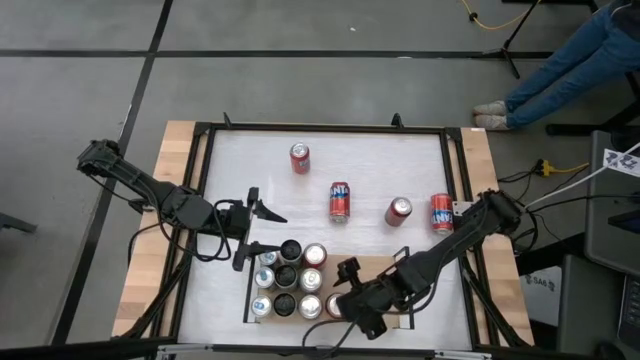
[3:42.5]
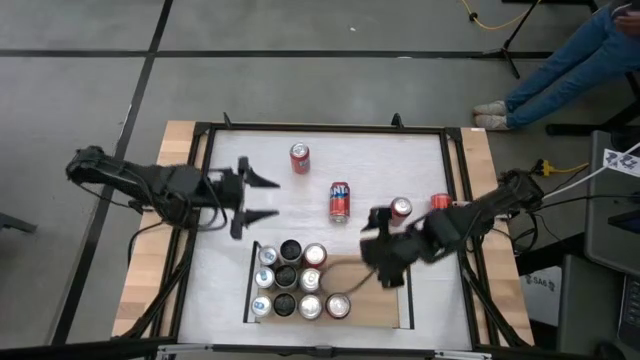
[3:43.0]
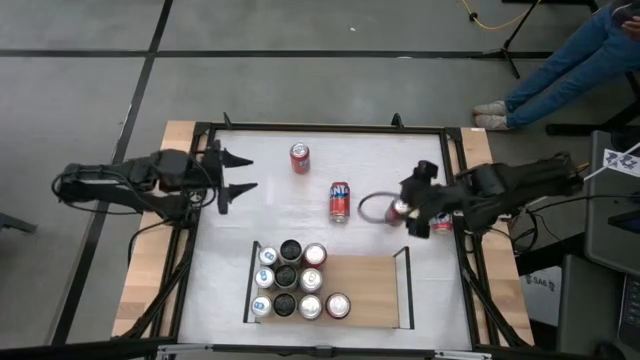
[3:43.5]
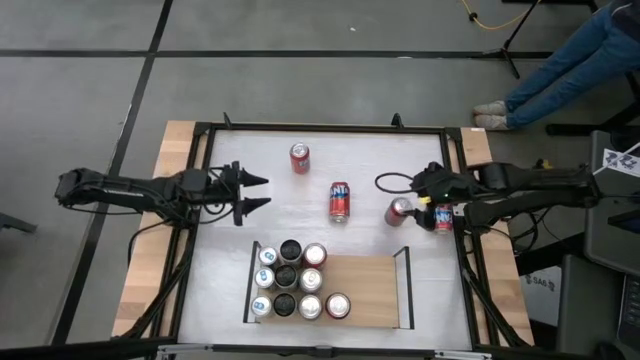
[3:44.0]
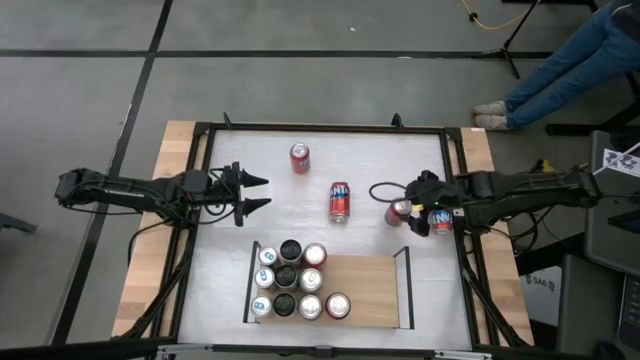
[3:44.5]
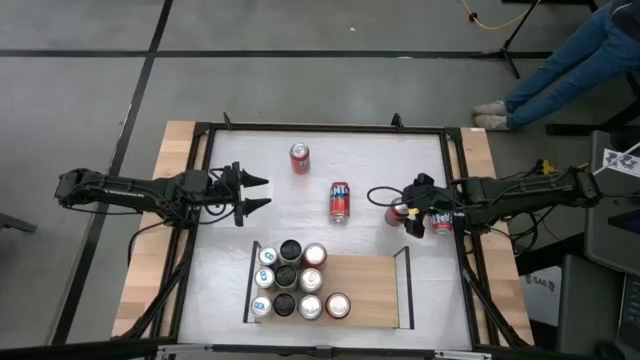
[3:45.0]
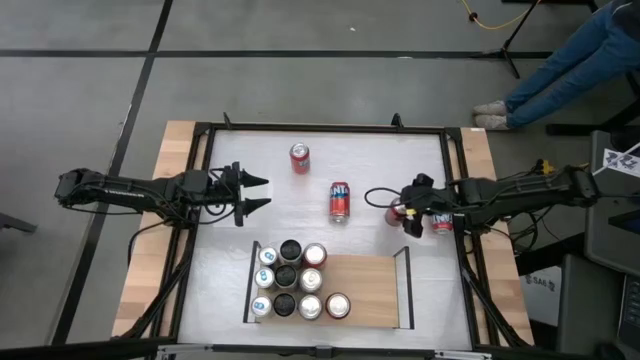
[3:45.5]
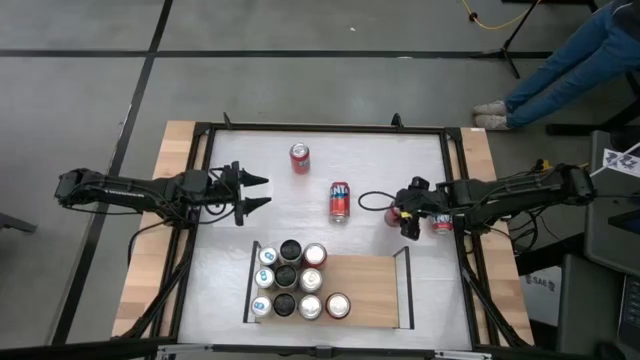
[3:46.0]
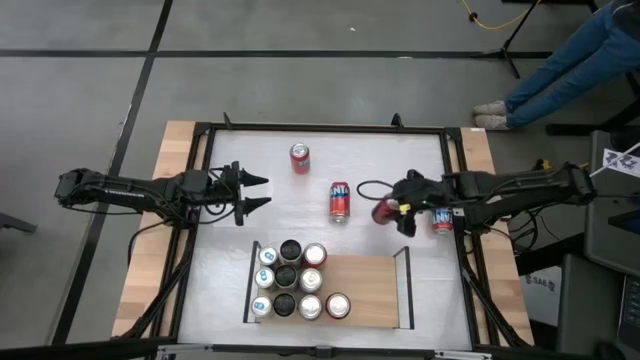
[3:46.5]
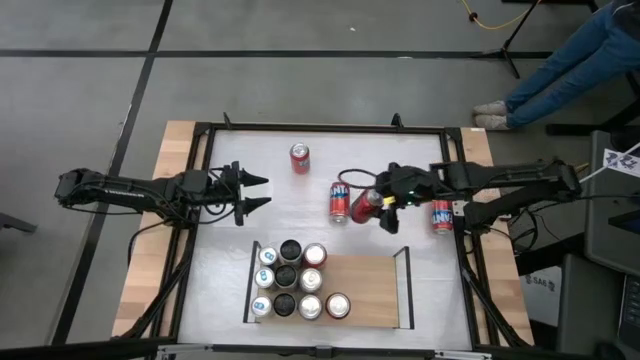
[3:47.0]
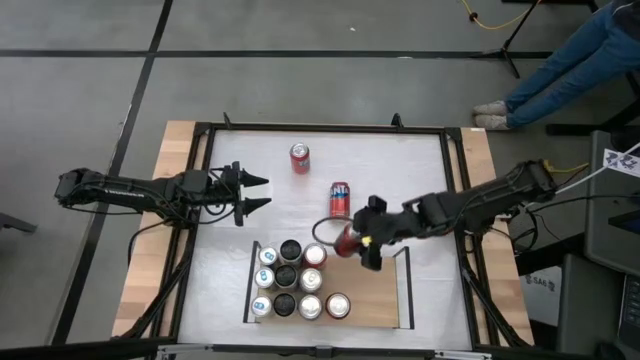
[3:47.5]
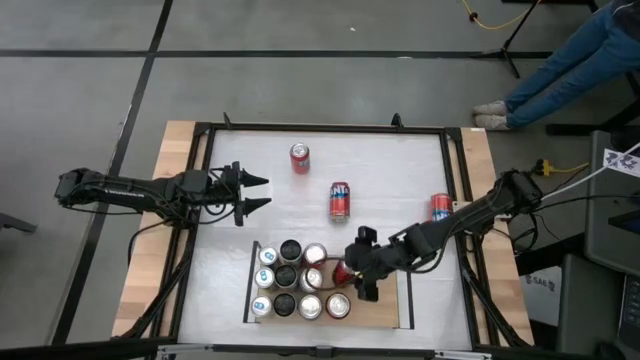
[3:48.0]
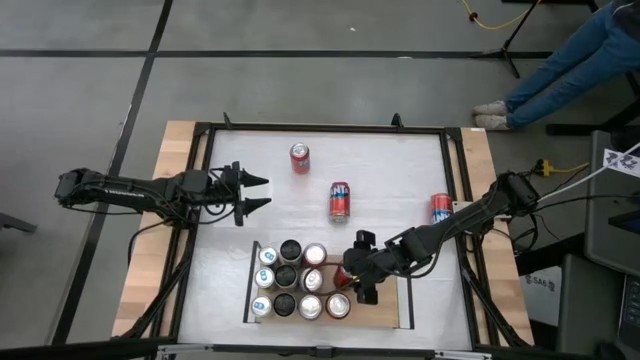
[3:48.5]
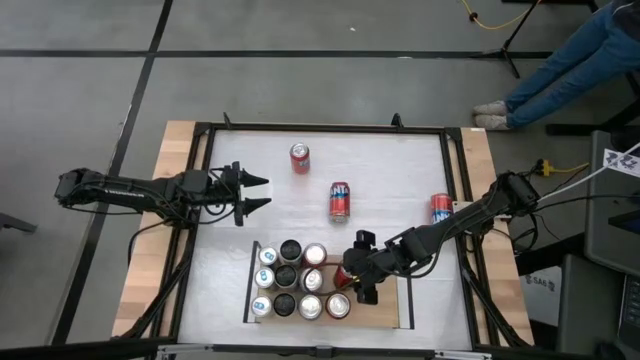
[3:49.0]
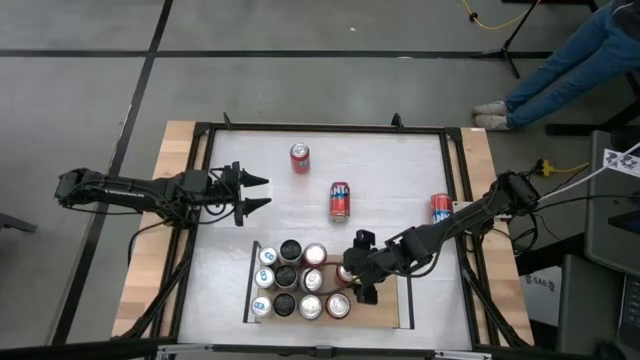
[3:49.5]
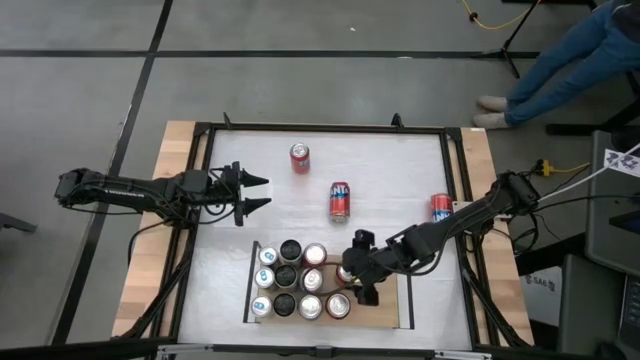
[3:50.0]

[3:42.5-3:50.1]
Task: Place canned beverage on shelf
Put the red soda can on the shelf aligned with the other red soda can

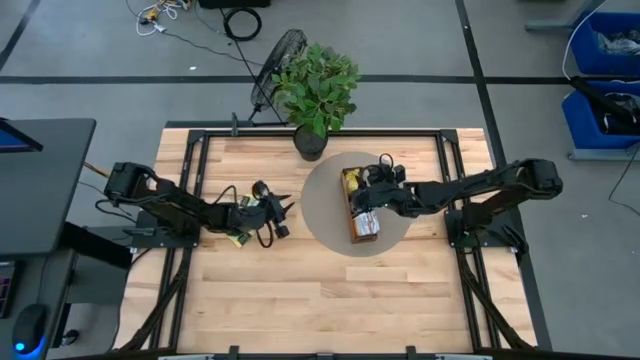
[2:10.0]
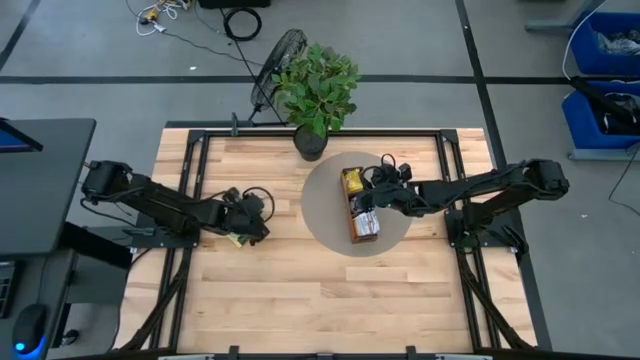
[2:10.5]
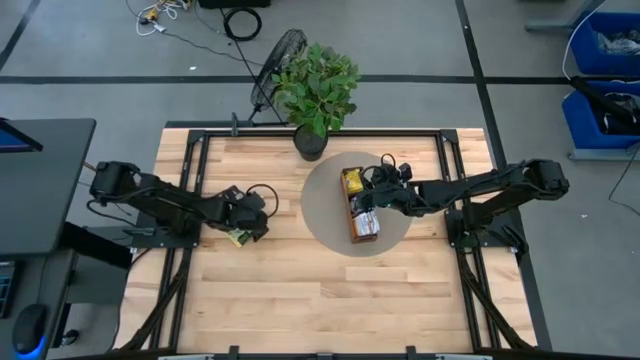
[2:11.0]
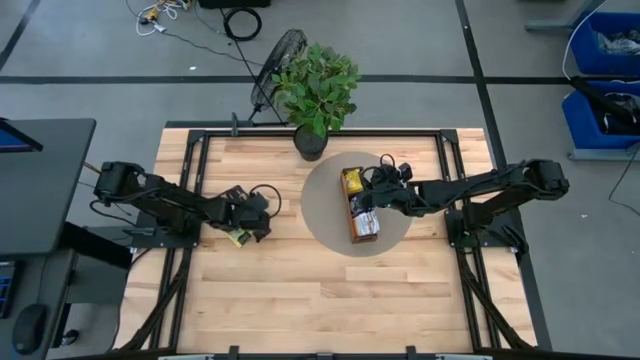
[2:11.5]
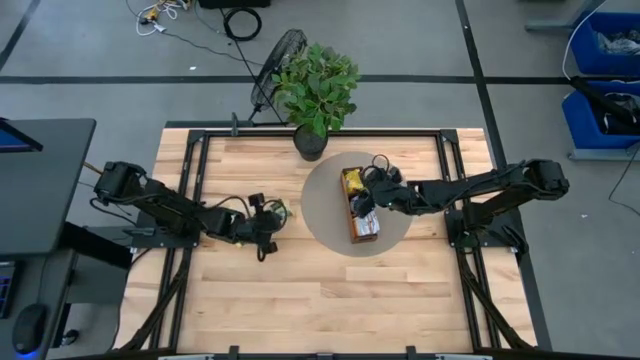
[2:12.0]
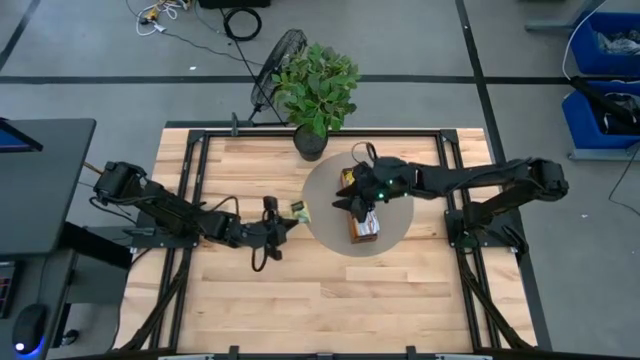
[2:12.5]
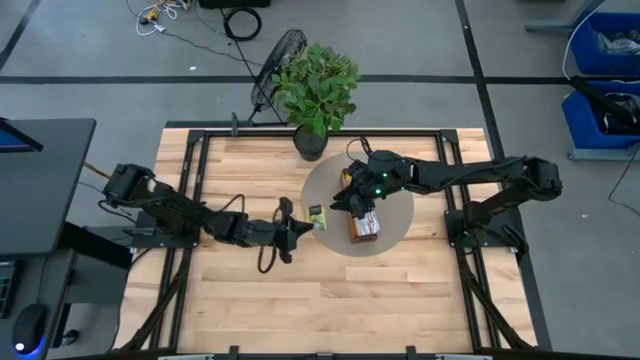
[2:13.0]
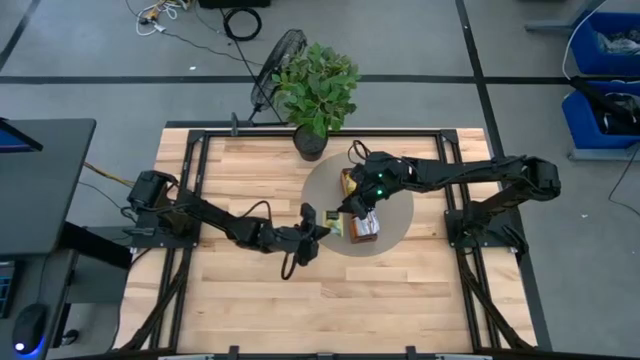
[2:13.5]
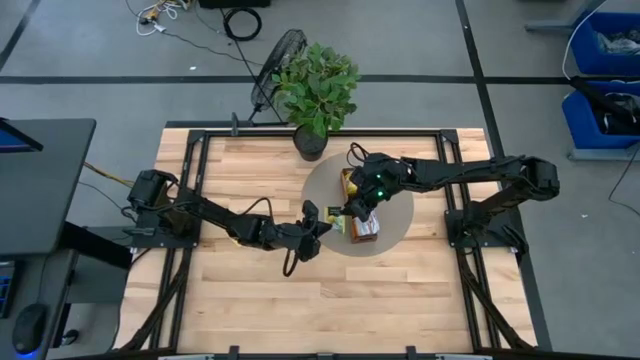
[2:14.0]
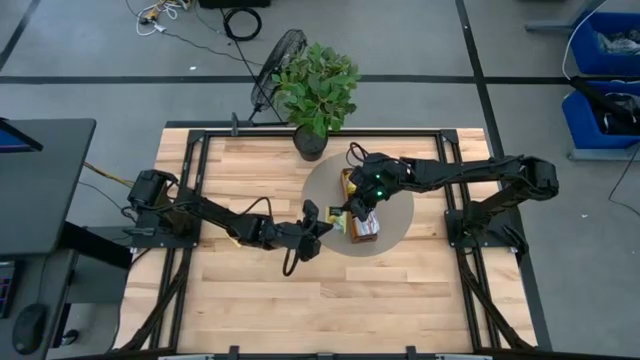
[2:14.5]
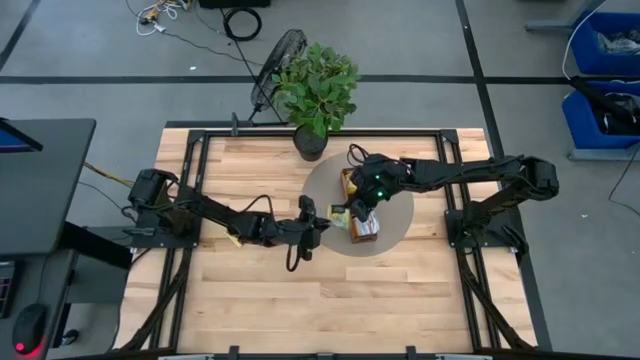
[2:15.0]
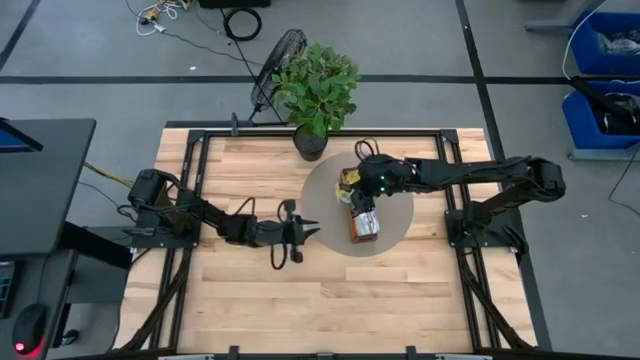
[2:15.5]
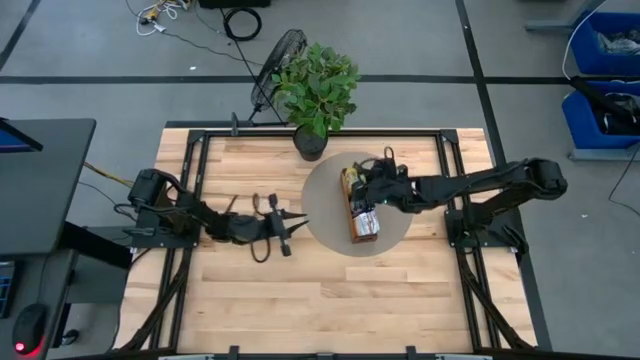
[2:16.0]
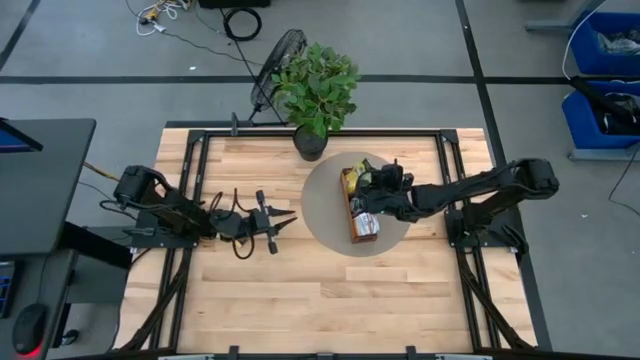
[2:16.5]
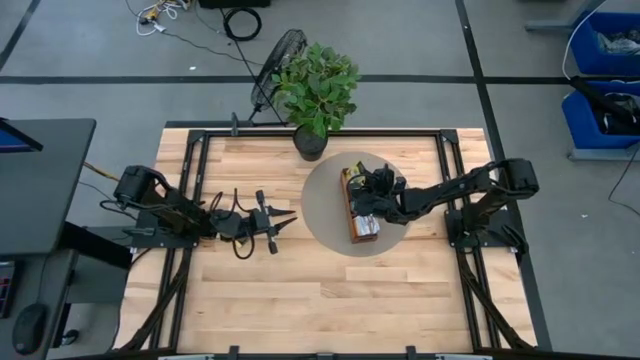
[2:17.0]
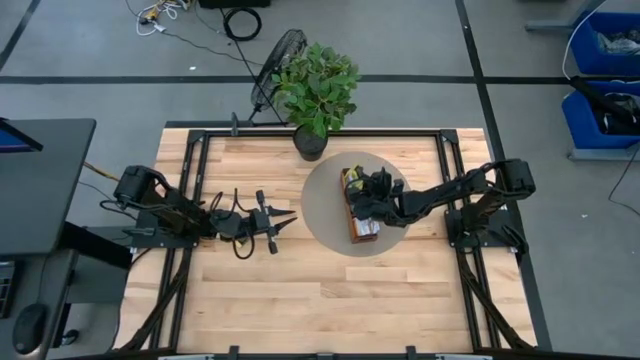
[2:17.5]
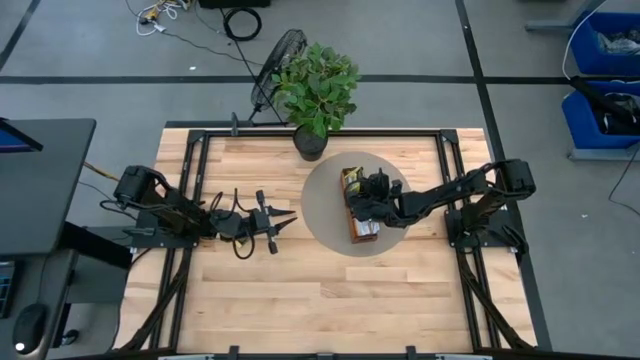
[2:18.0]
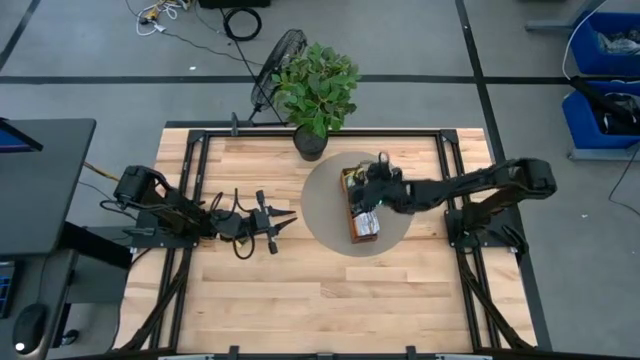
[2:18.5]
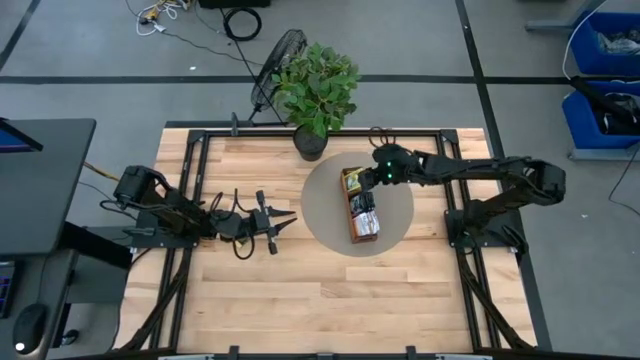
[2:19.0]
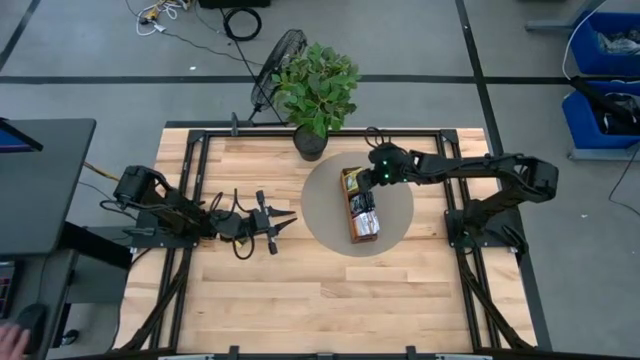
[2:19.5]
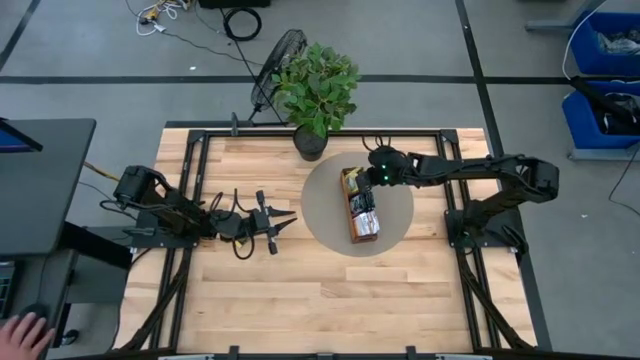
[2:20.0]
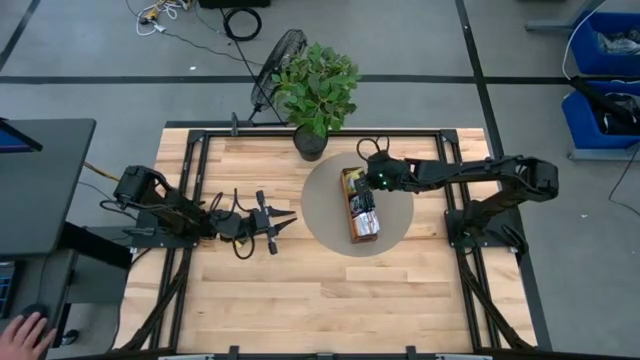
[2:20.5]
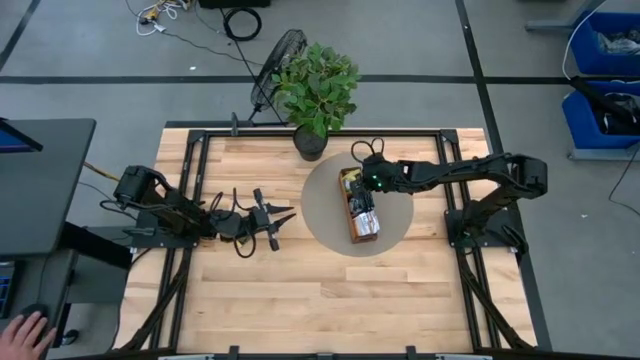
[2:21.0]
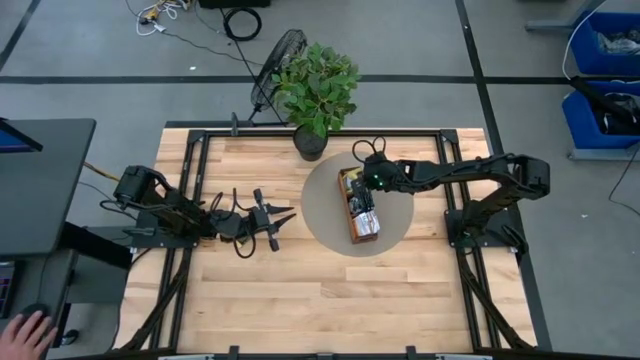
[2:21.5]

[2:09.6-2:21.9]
Task: Pick & Place Tea
Put the yellow tea bag into the top section of the wooden organizer

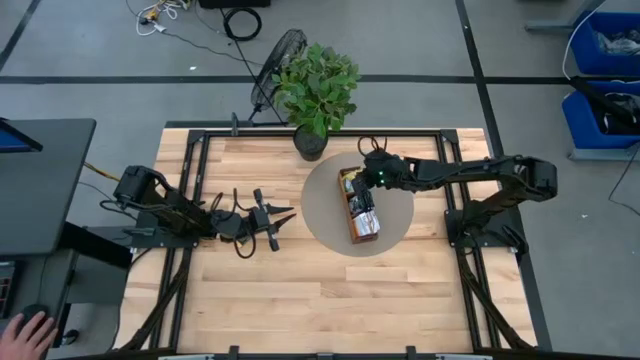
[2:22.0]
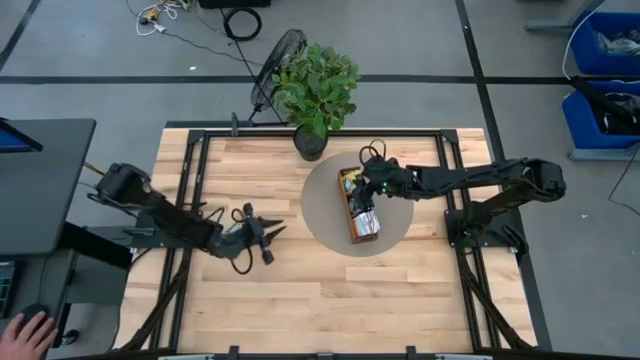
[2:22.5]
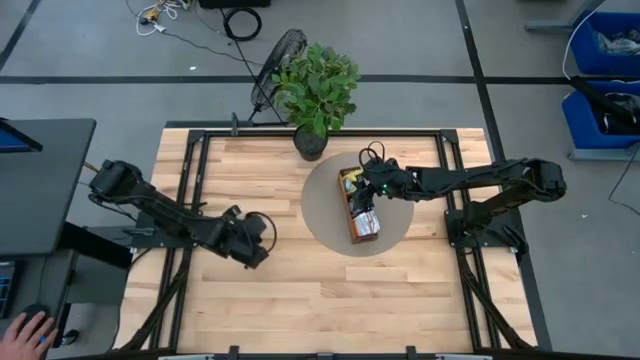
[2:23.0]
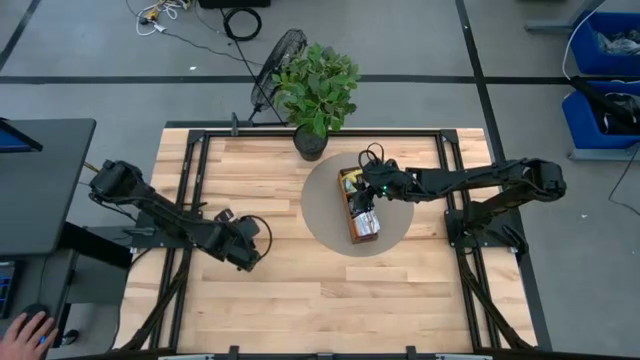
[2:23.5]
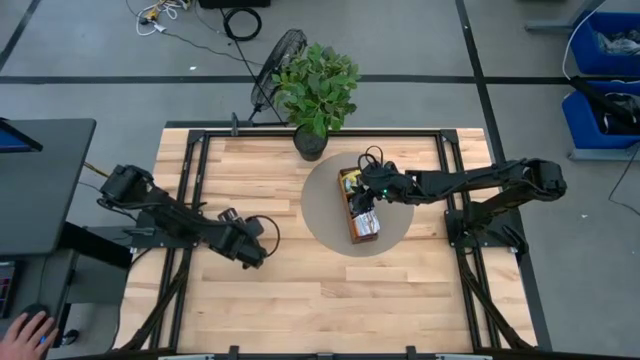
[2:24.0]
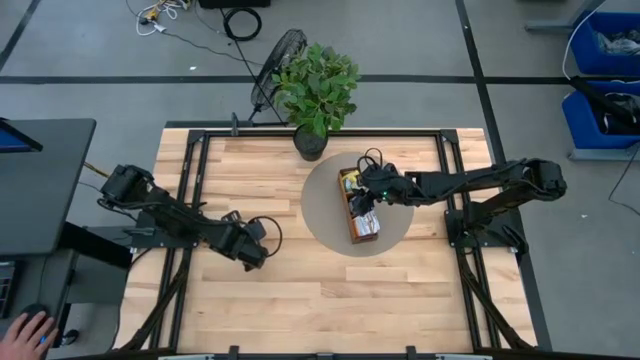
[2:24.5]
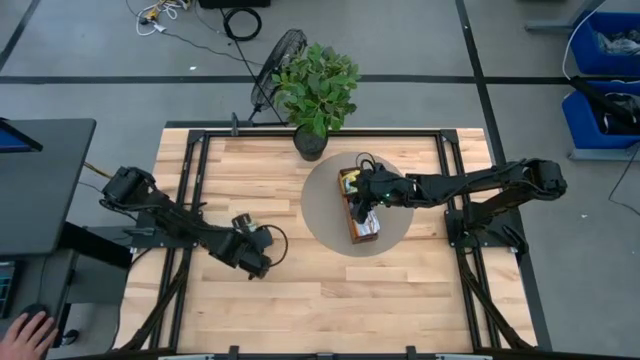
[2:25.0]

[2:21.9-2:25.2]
Put the yellow tea bag into the top section of the wooden organizer
